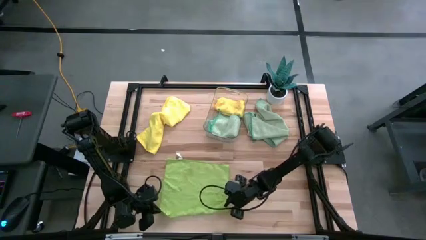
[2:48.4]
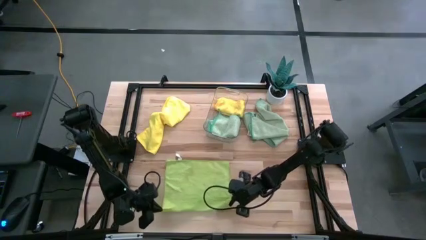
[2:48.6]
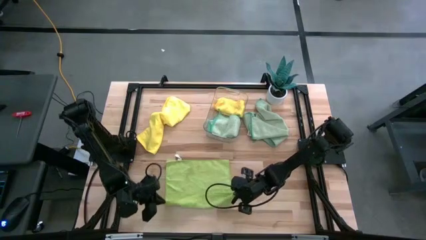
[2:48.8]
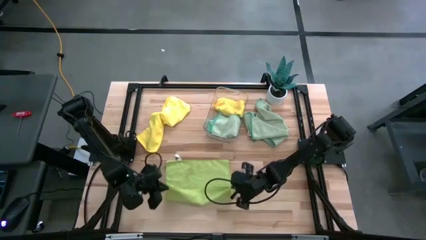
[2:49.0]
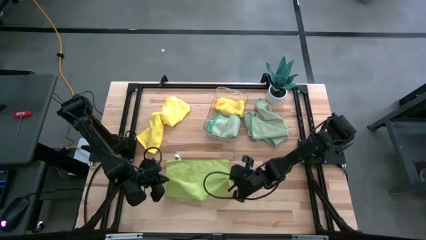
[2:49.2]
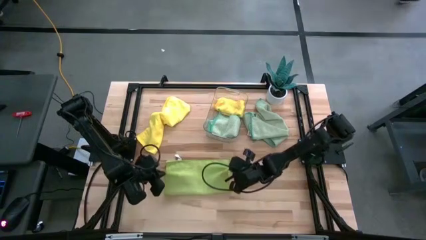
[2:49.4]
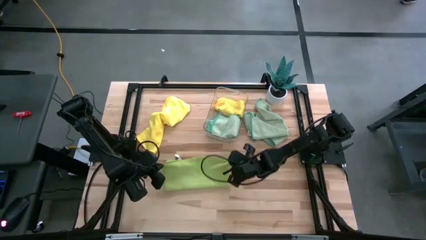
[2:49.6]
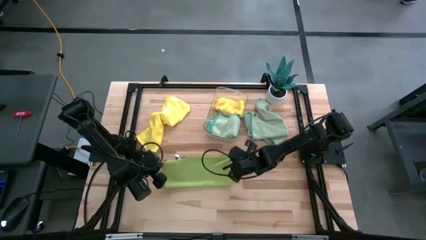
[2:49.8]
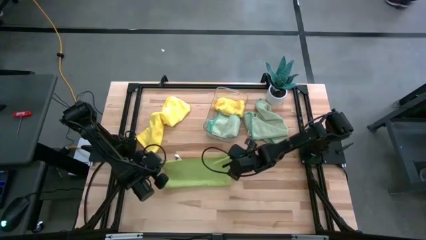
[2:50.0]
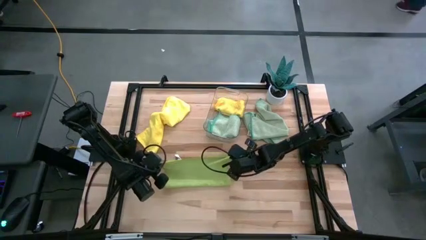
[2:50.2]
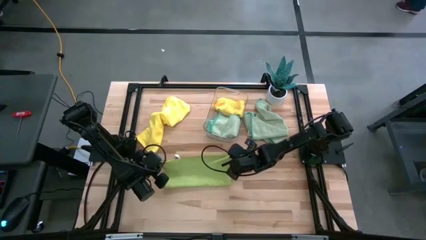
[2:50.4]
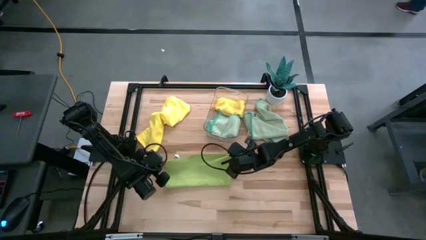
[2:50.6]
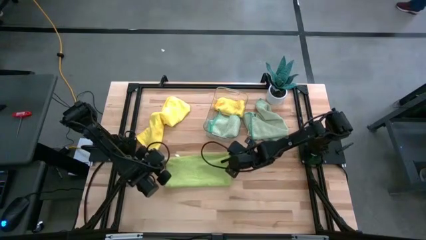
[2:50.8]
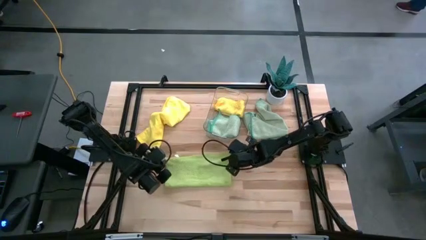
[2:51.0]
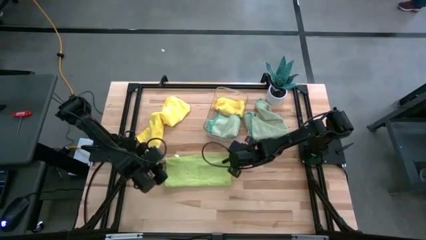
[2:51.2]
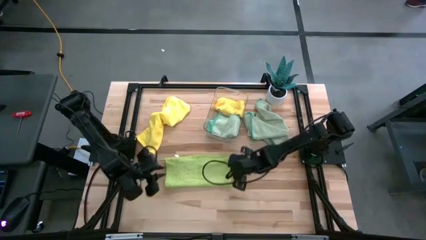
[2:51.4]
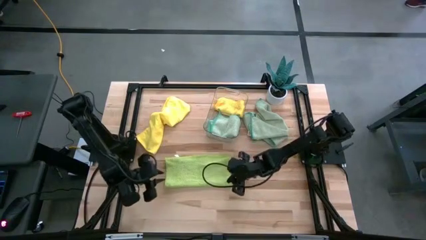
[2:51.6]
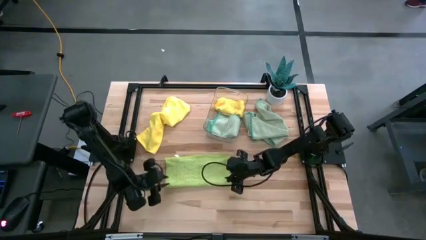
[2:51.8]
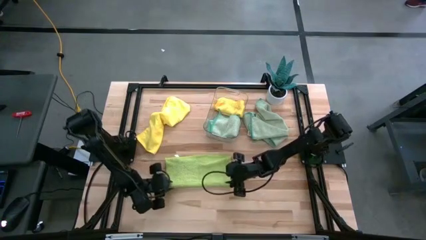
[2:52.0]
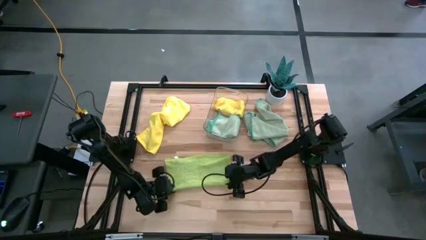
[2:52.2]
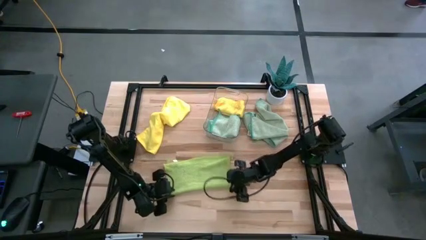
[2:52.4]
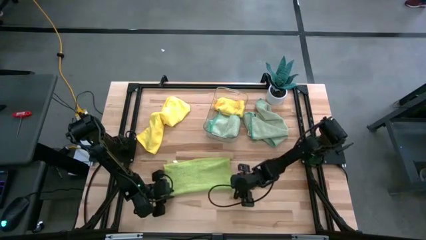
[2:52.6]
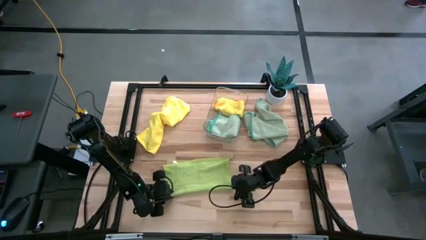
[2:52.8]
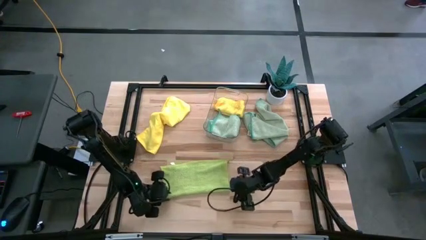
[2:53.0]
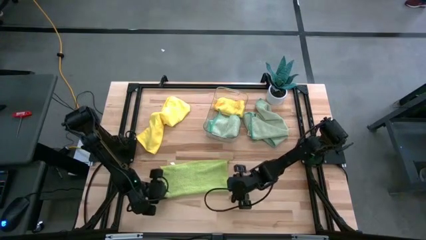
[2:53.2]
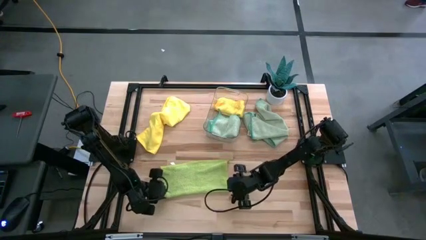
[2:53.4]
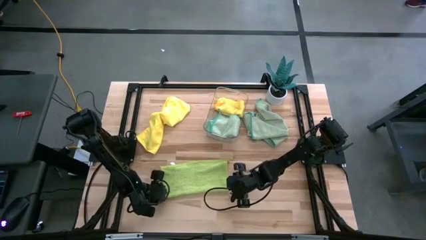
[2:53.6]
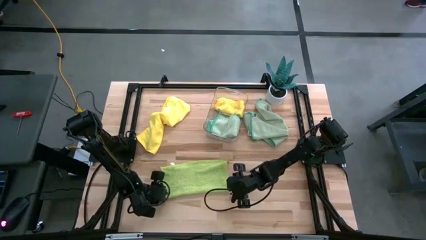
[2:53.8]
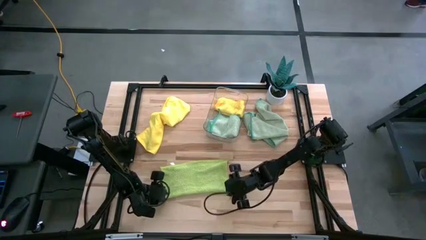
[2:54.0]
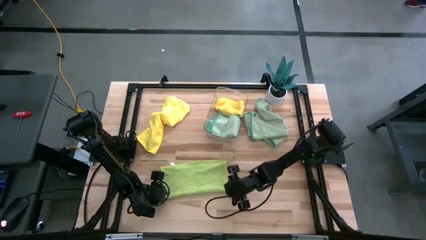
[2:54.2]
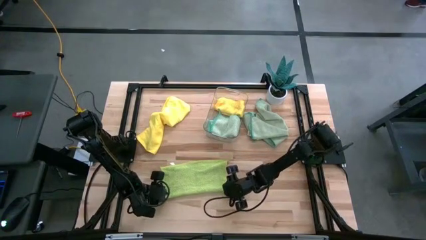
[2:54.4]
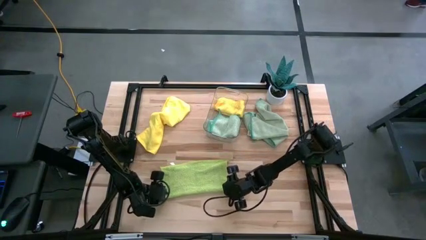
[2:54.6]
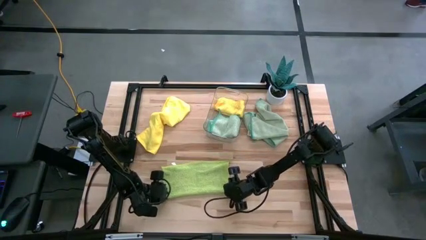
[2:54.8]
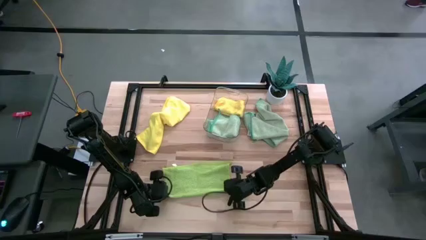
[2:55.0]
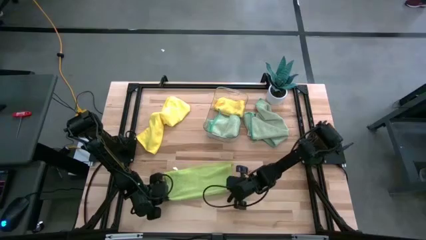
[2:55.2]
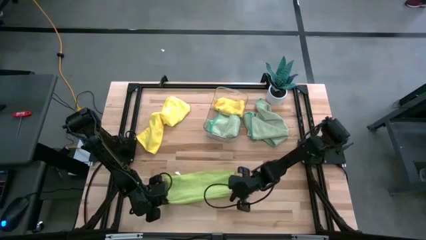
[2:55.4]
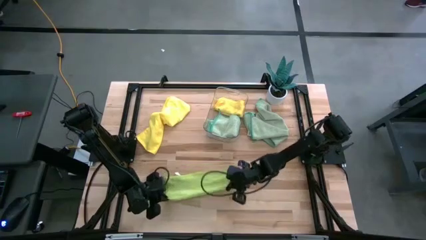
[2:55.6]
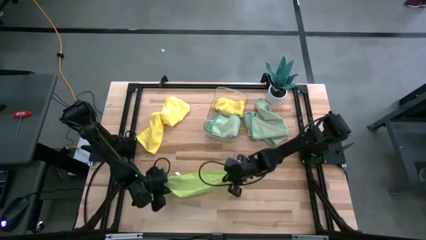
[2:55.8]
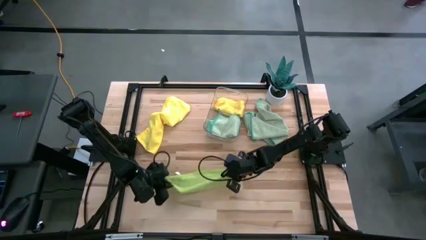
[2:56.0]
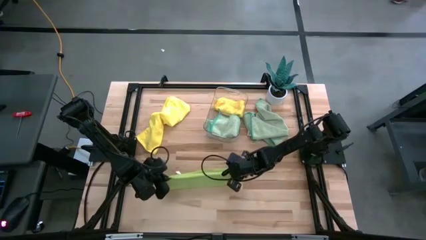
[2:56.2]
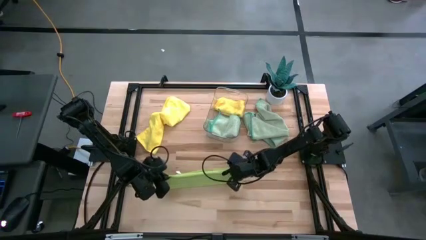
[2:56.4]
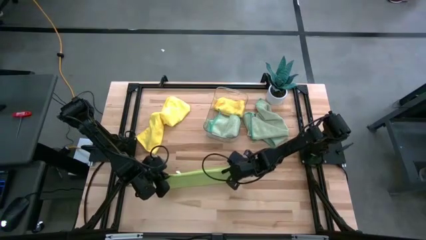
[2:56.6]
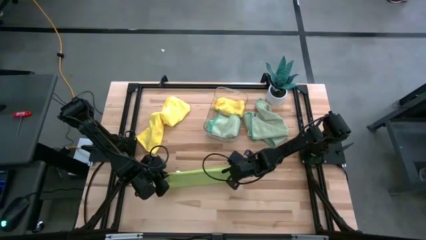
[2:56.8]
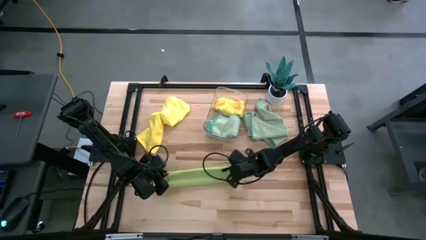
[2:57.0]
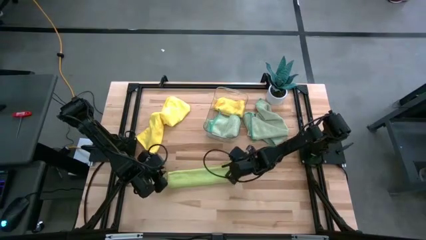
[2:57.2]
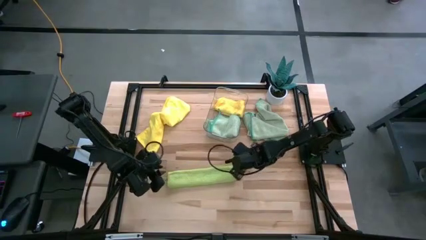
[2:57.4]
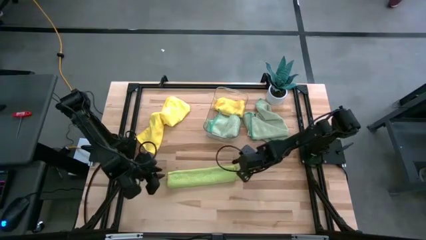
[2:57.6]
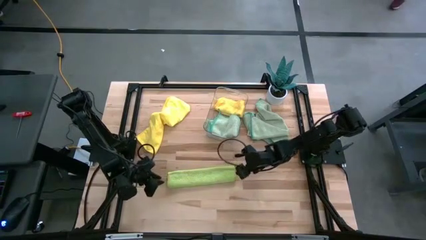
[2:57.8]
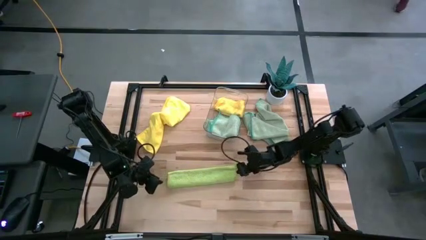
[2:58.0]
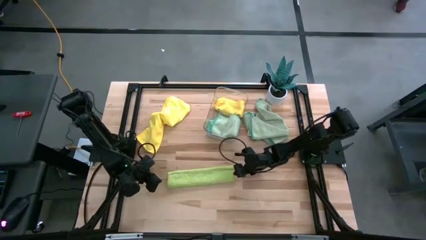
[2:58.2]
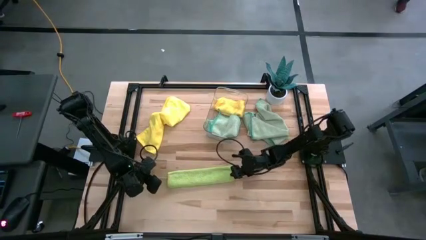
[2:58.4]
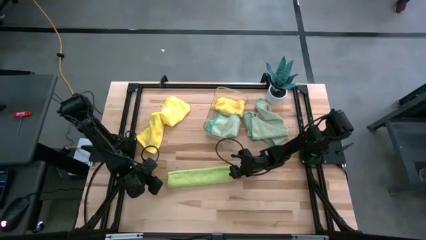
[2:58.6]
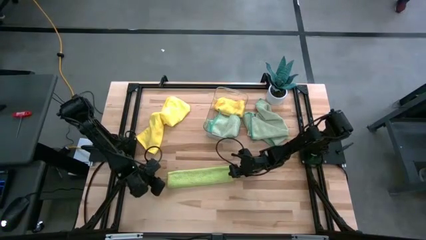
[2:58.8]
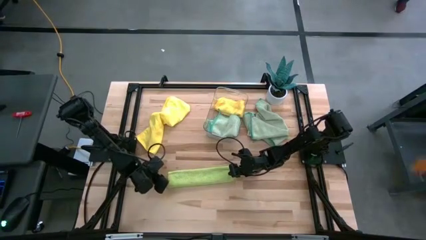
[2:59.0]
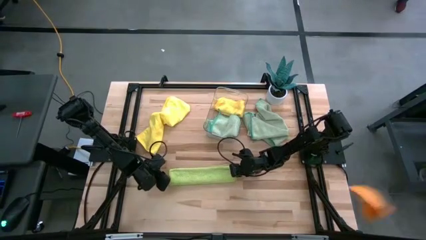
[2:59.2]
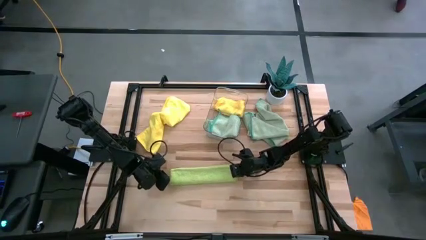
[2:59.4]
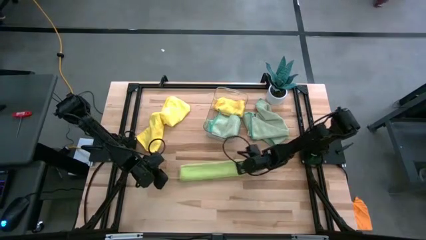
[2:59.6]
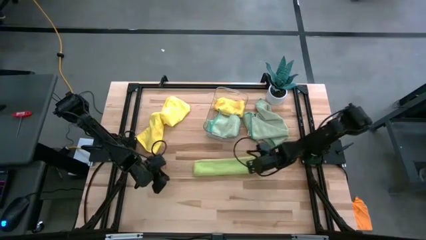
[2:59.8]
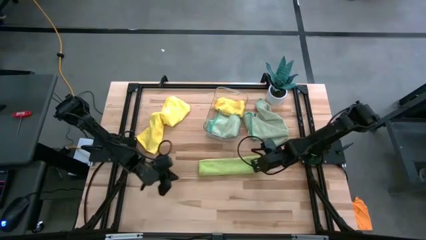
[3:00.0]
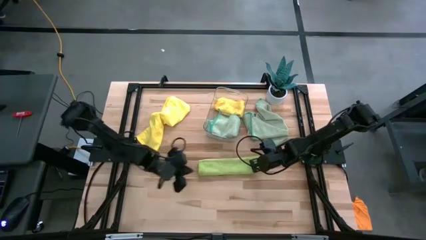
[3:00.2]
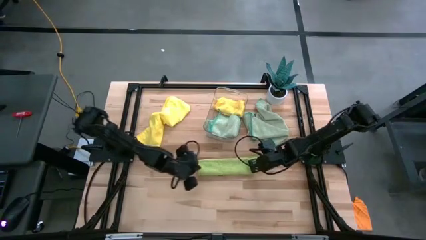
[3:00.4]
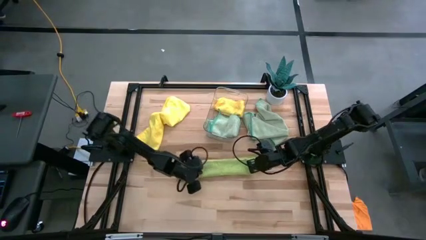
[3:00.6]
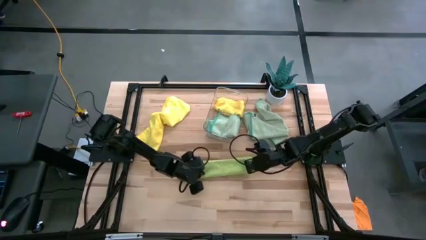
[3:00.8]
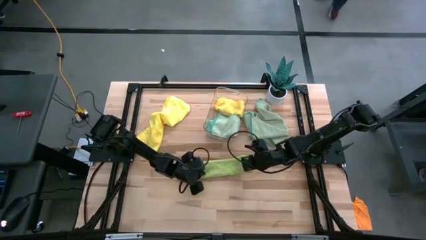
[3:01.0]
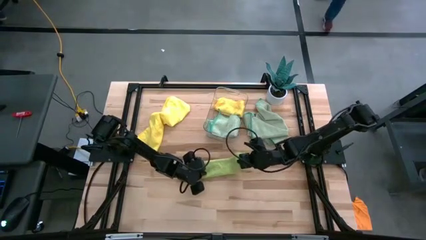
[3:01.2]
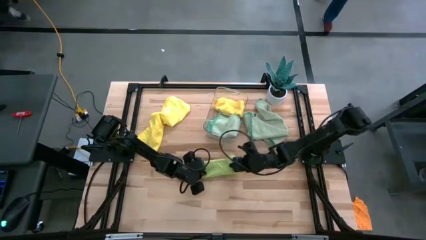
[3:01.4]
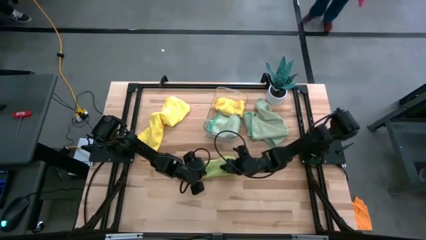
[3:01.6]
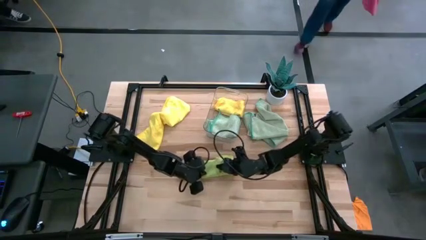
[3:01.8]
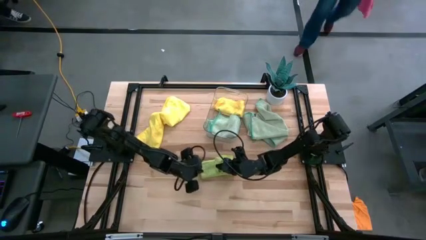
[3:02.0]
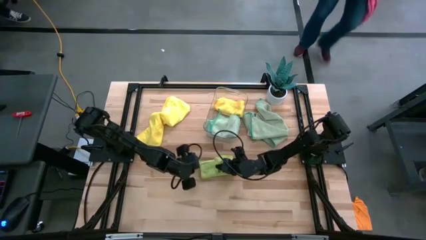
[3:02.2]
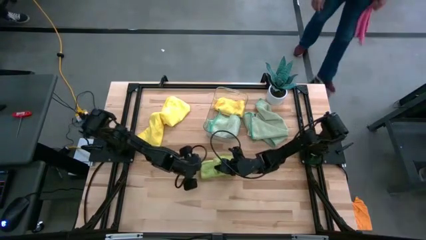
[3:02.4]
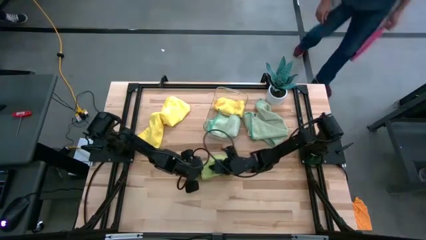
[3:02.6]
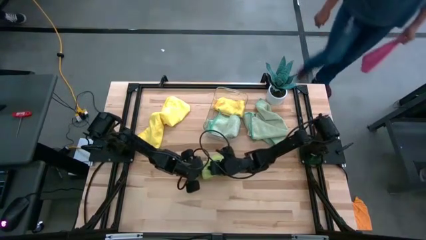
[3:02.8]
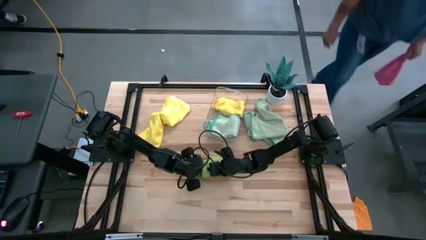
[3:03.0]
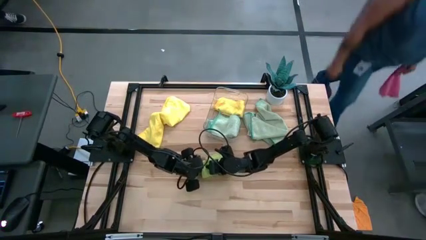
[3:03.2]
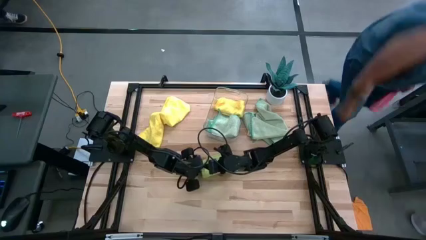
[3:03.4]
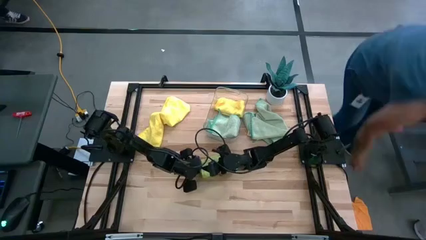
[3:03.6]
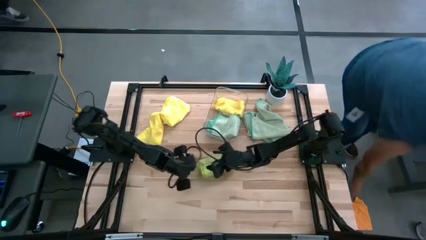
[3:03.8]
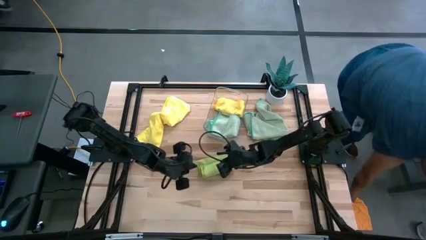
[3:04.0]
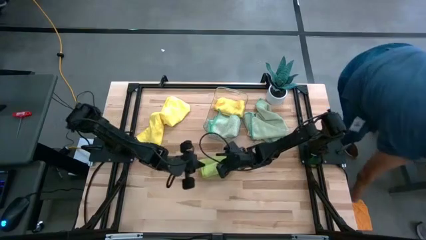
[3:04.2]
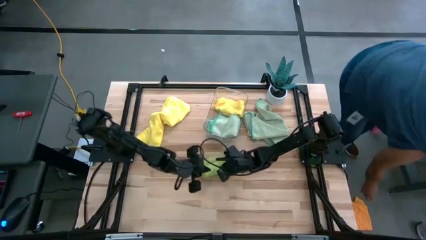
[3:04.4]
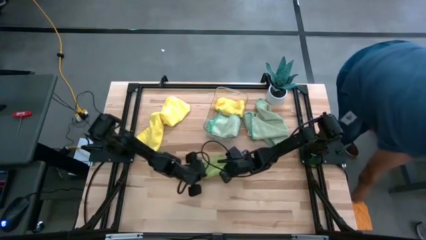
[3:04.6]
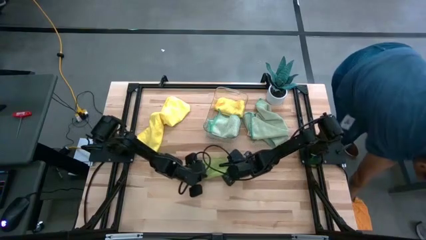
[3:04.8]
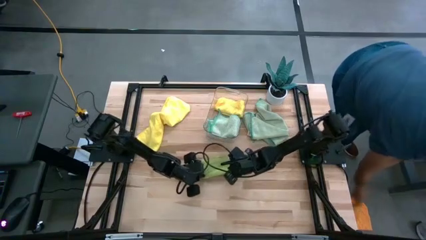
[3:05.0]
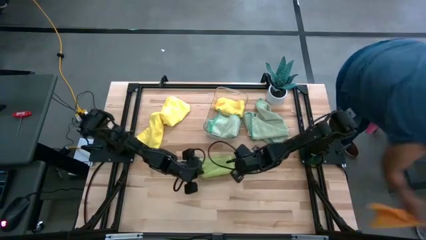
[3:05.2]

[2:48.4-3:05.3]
Task: Fold microfiber towels
Fold the green towel
